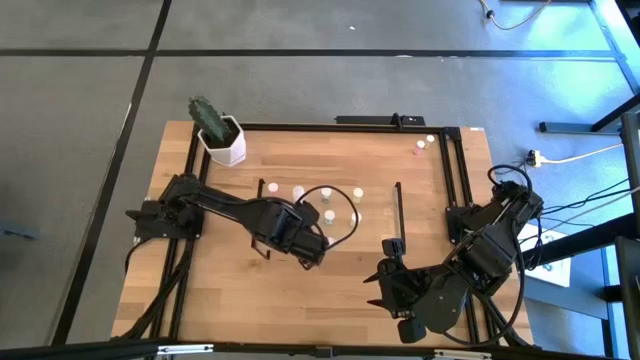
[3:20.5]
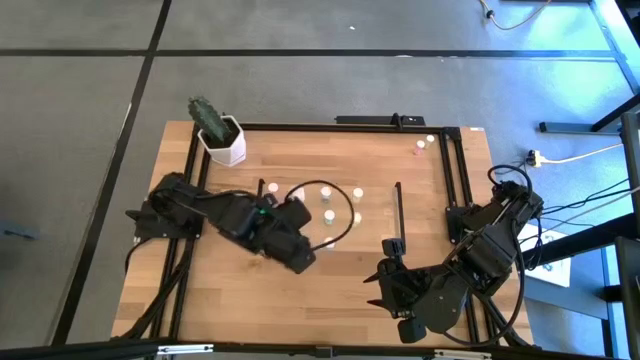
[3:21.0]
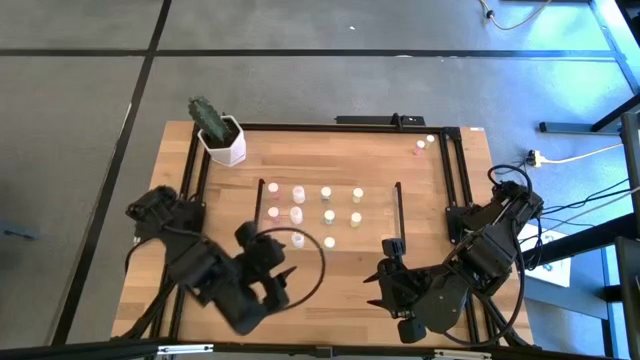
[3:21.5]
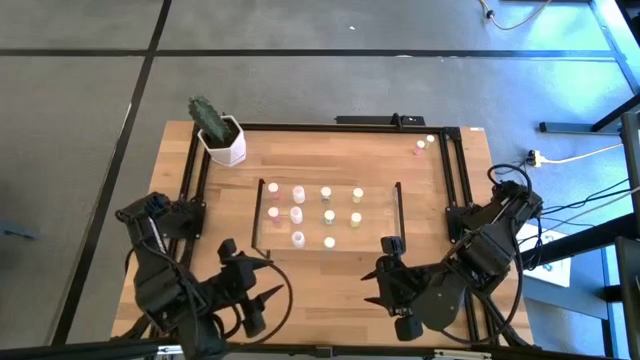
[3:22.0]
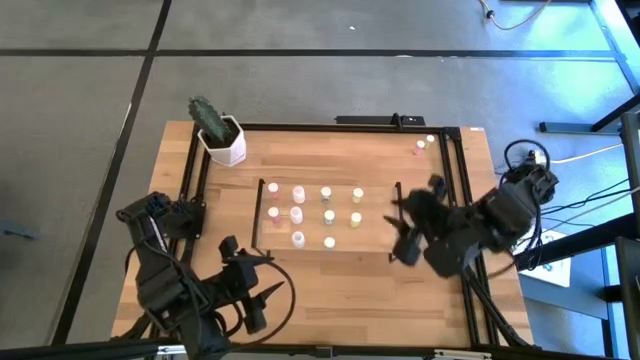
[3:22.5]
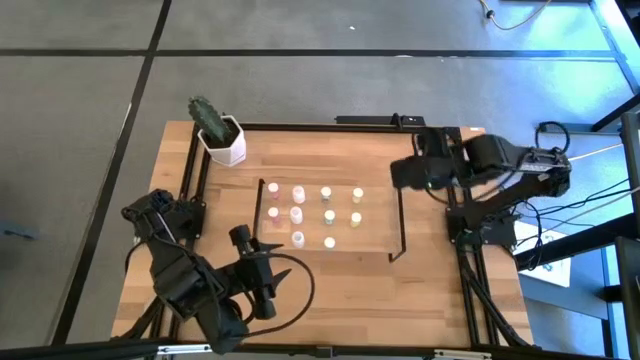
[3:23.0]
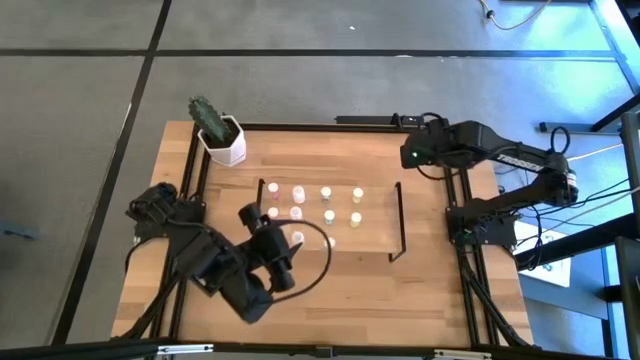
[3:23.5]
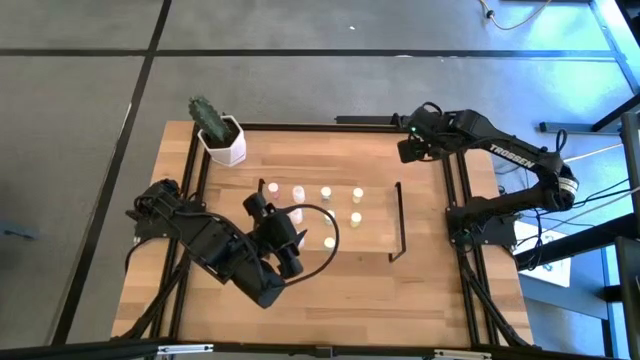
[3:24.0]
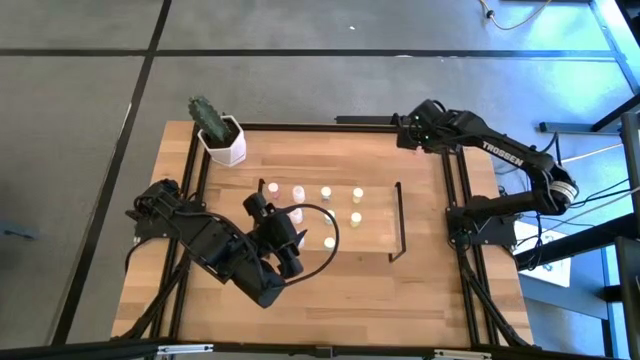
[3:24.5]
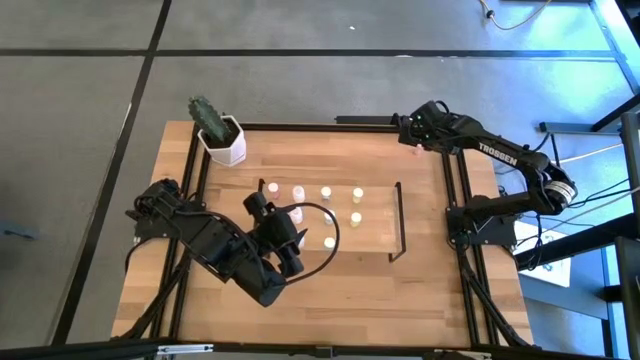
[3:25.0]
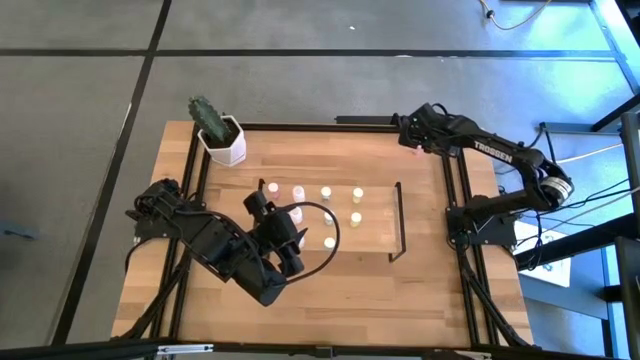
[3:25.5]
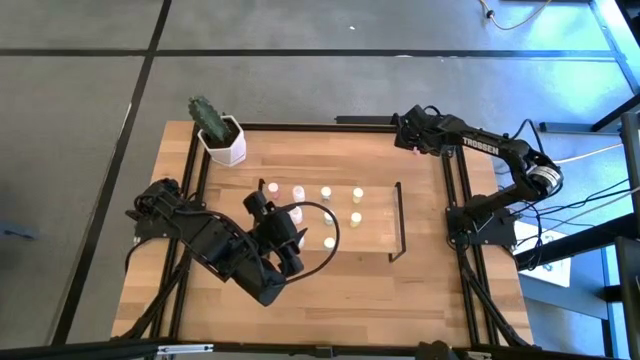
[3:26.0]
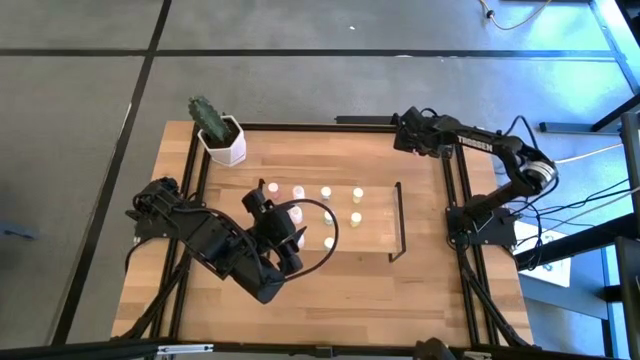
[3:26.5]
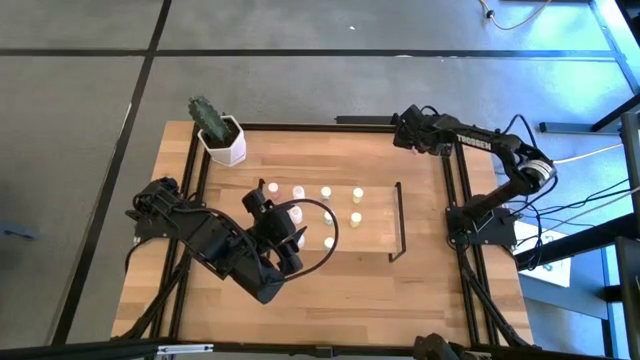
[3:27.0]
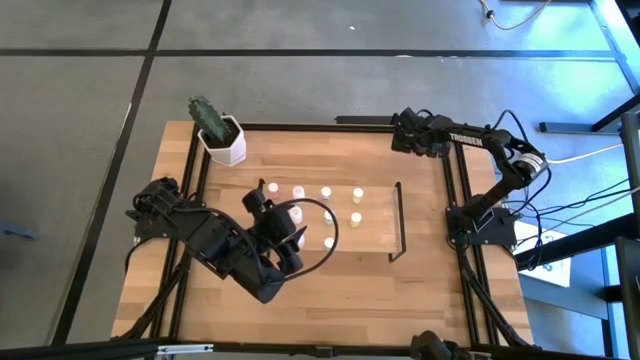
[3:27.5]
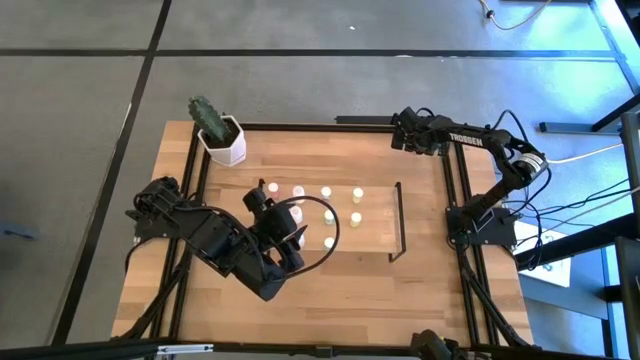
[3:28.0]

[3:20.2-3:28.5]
Task: Pick and place medicine bottles onto shelf by color
Put the pink pill bottle on the shelf aligned with the other pink pill bottles

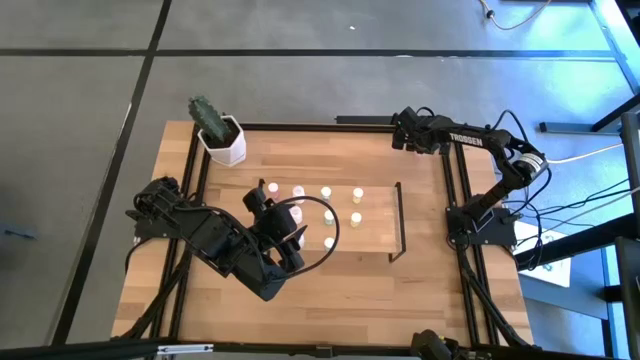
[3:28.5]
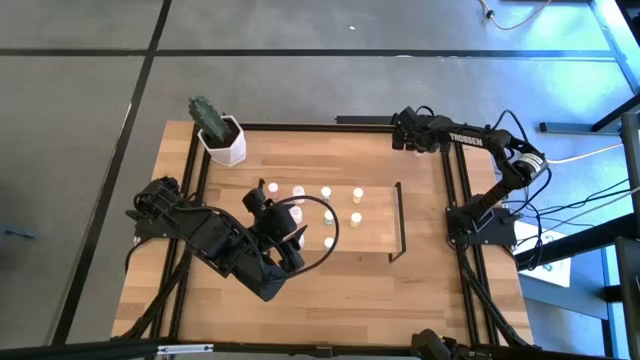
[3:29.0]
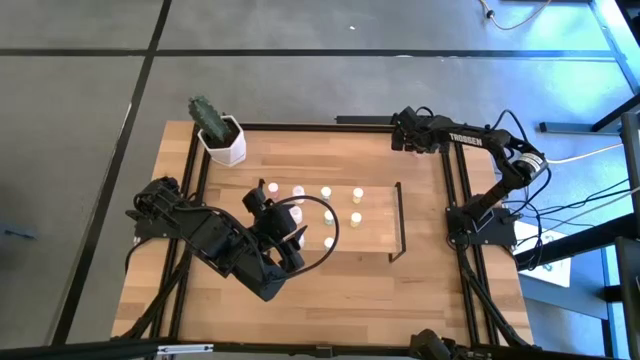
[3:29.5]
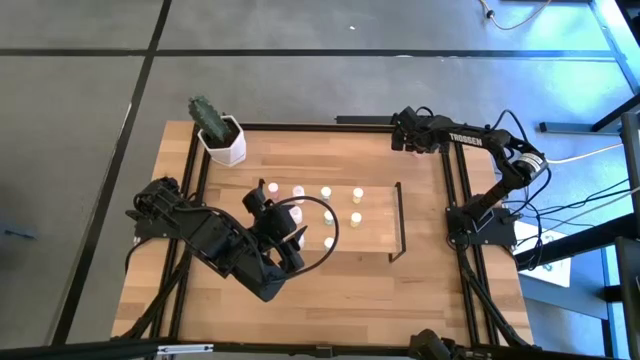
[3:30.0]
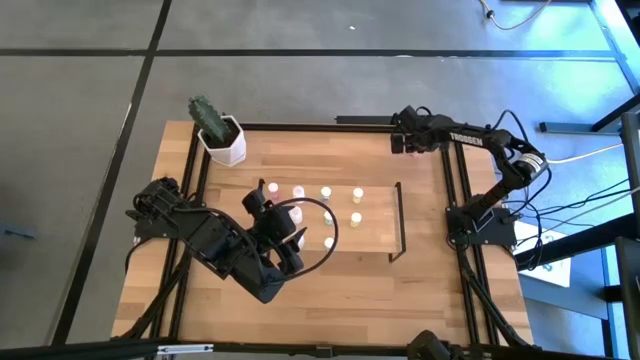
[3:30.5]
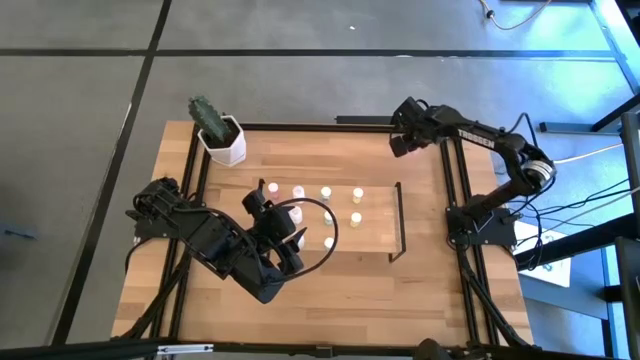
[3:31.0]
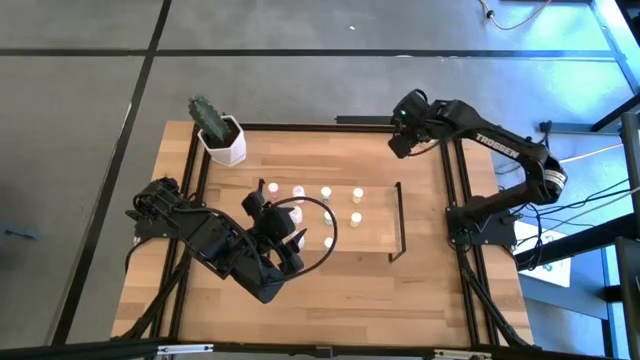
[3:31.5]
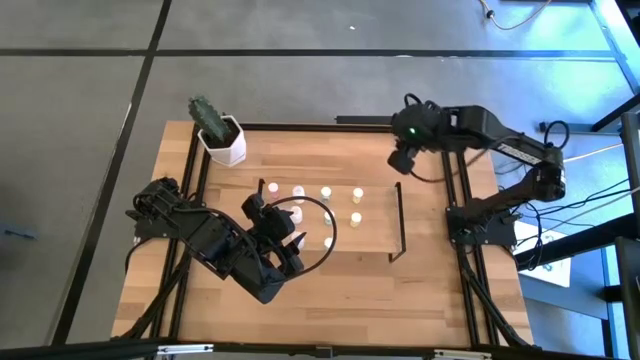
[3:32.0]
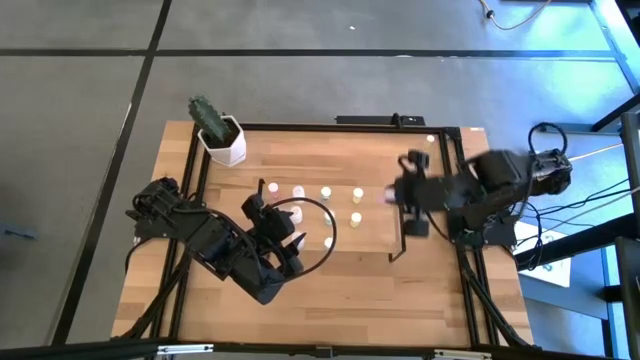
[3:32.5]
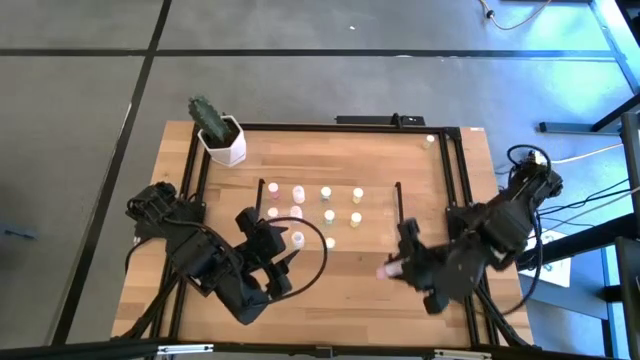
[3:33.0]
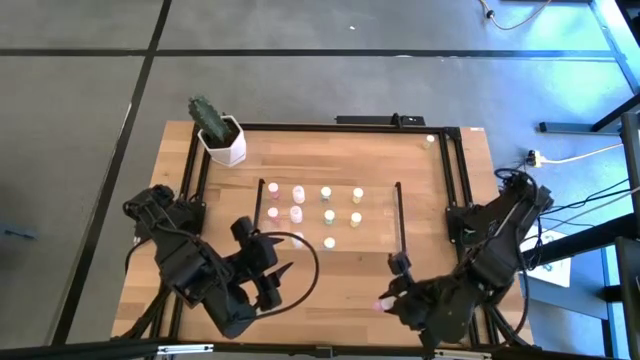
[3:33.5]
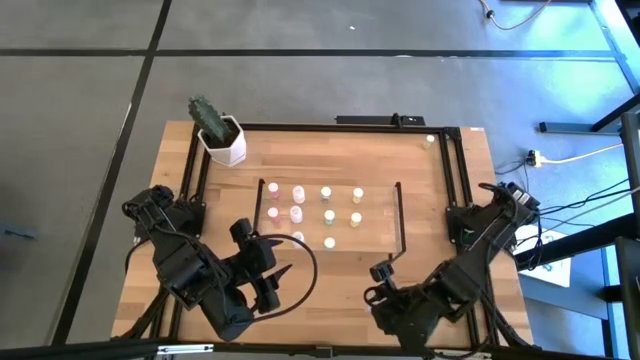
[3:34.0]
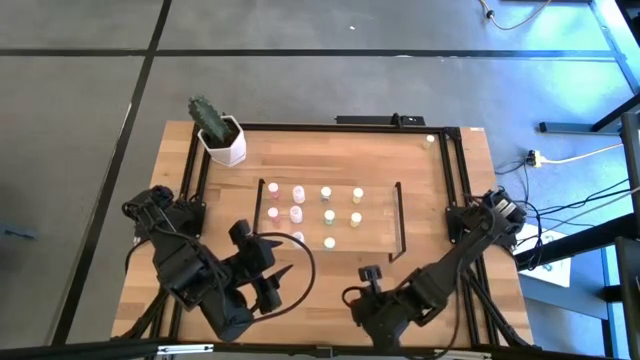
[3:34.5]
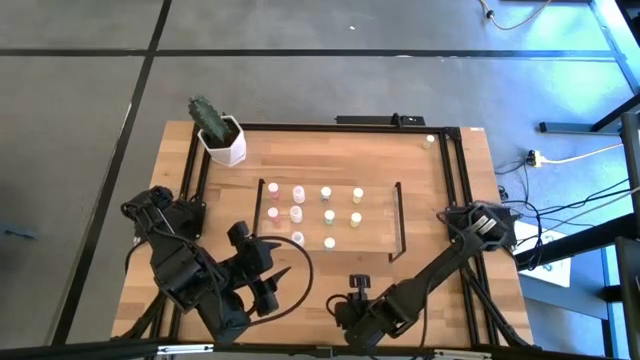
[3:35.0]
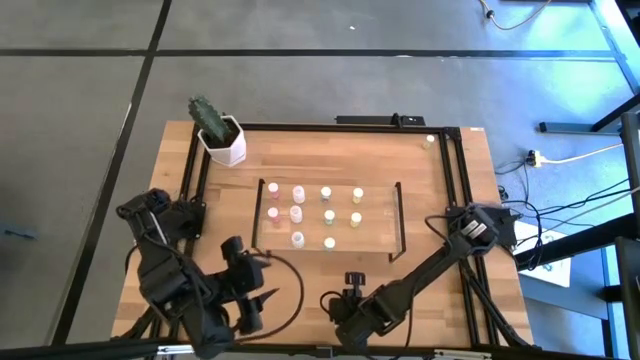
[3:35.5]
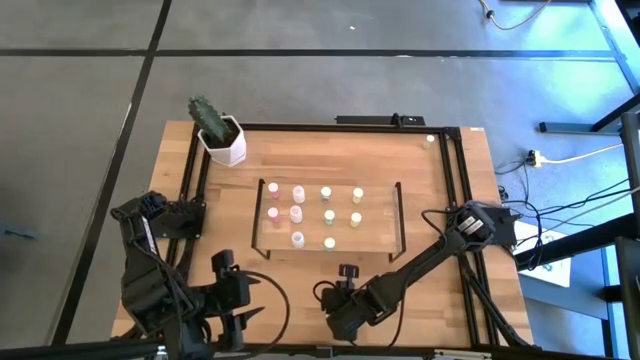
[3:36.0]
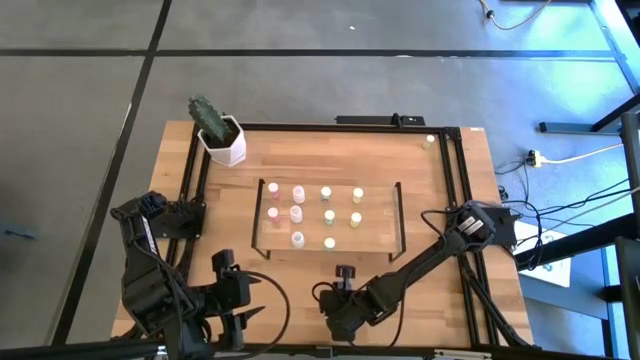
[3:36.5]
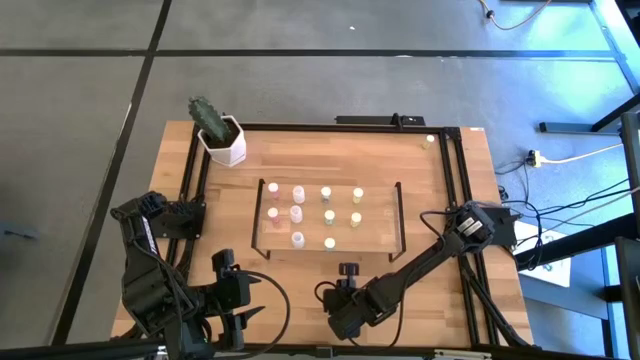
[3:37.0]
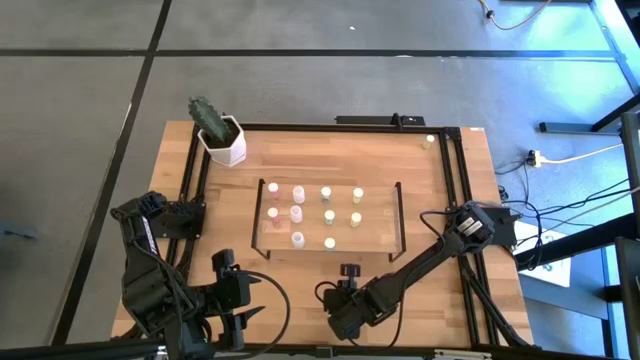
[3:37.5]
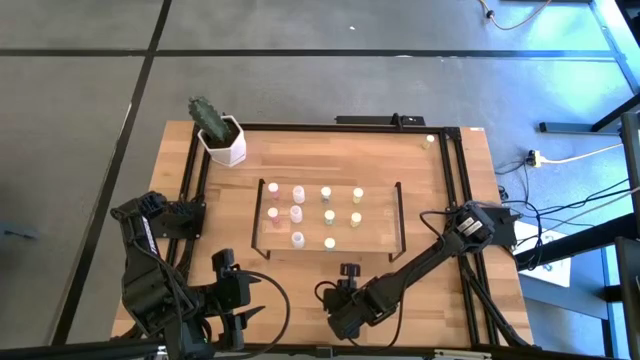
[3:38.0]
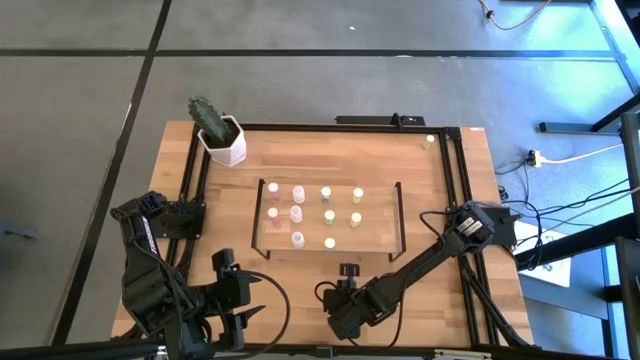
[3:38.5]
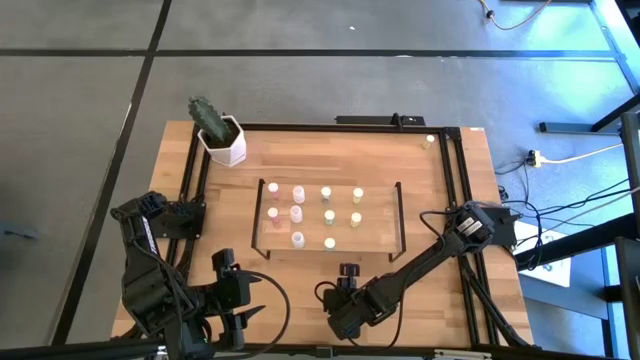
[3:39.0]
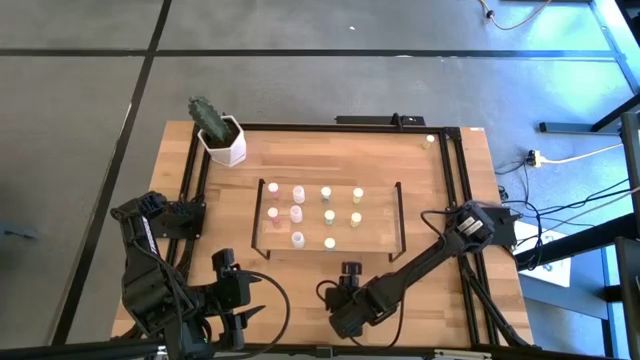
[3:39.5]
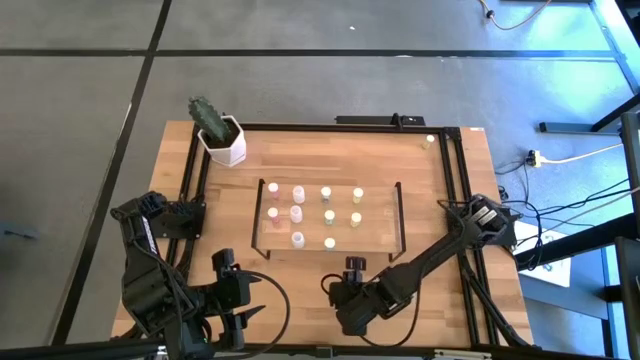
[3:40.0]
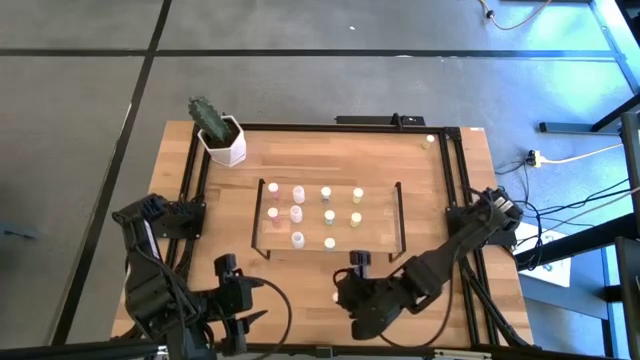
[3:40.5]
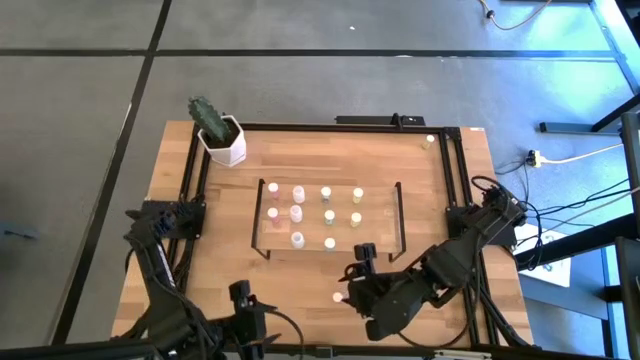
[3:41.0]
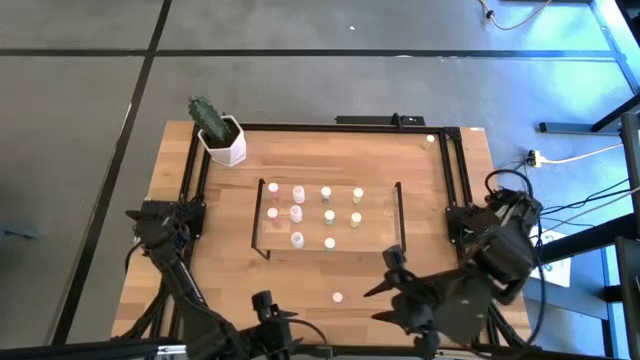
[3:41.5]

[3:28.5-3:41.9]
Put the pink pill bottle on the shelf aligned with the other pink pill bottles

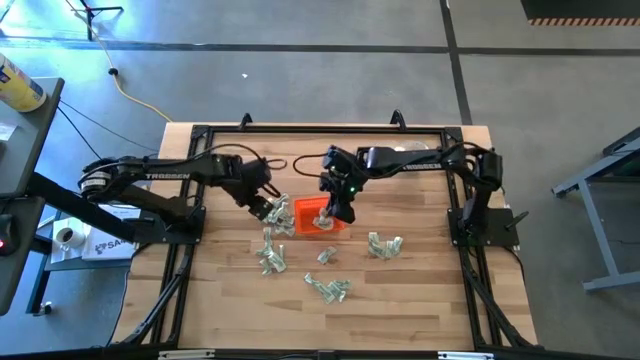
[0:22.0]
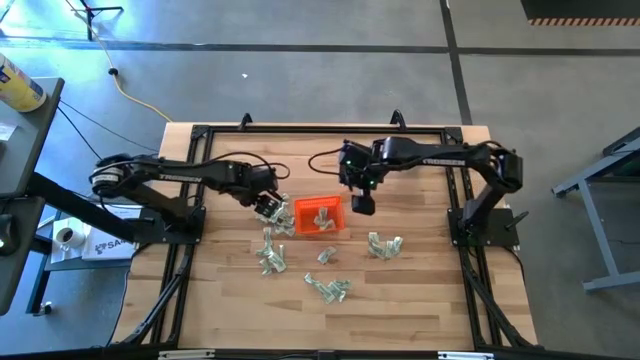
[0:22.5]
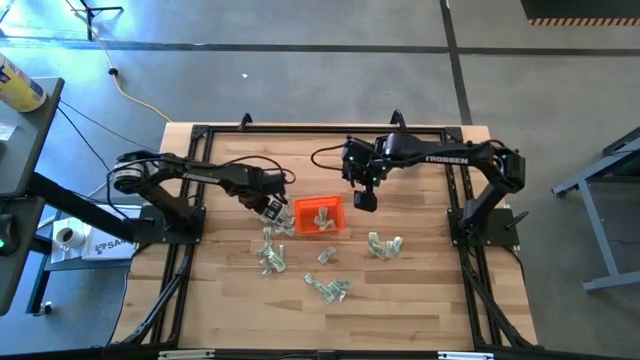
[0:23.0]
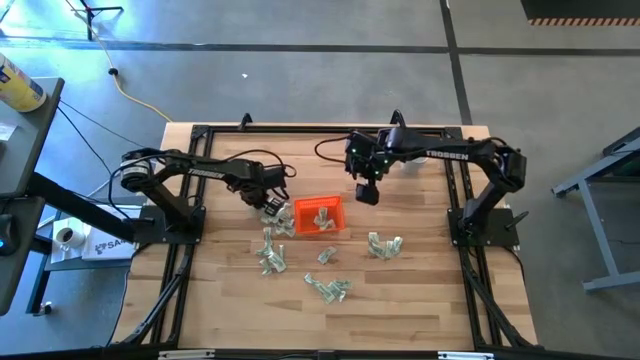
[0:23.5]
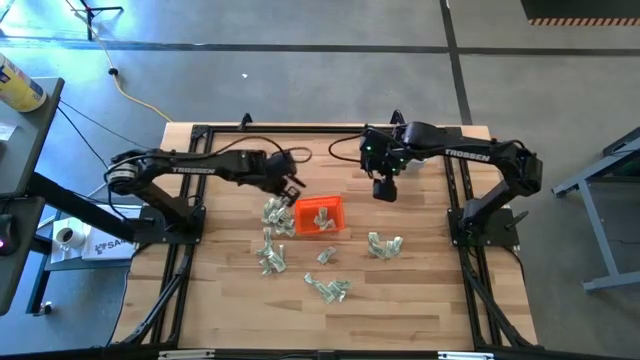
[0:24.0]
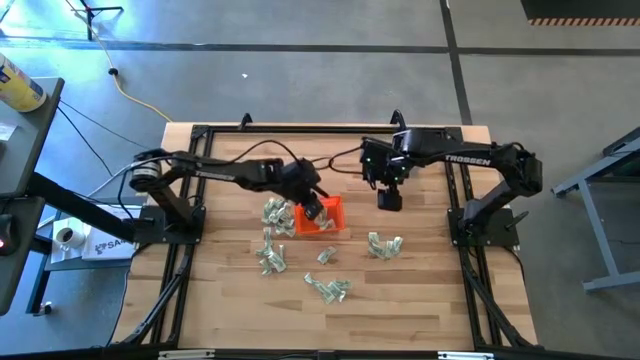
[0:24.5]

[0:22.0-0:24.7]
Task: Pick and place Stevia / Truvia into bins
Put the stevia packet into the orange bin
